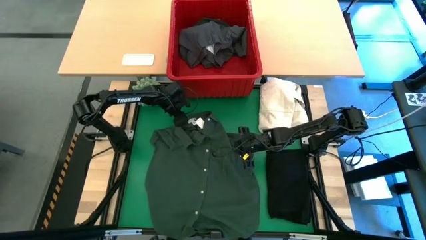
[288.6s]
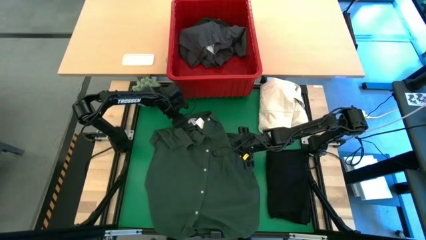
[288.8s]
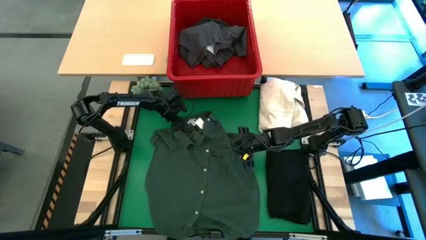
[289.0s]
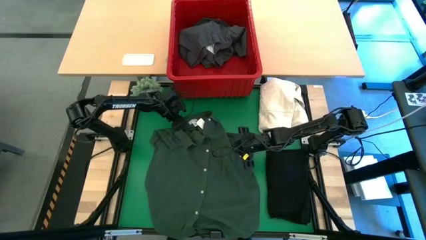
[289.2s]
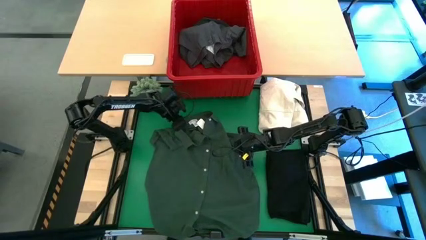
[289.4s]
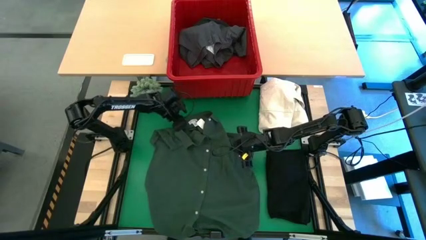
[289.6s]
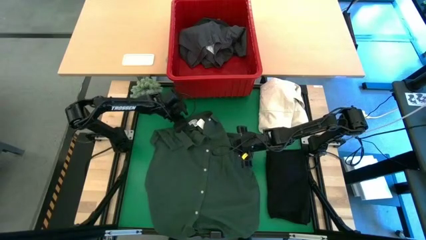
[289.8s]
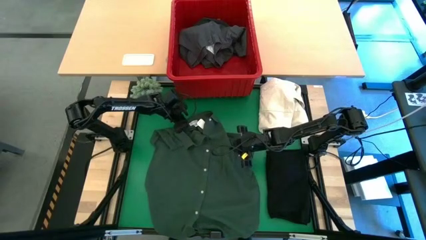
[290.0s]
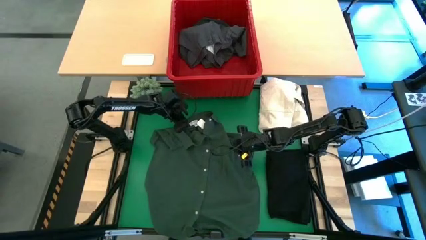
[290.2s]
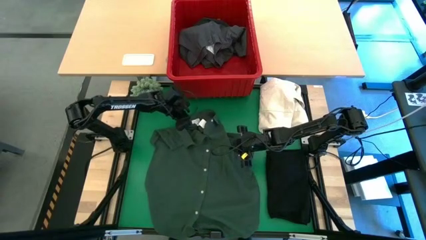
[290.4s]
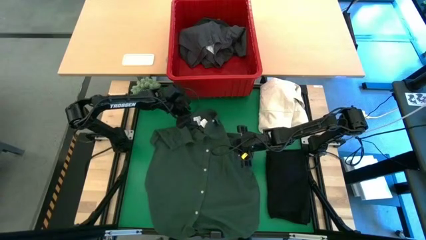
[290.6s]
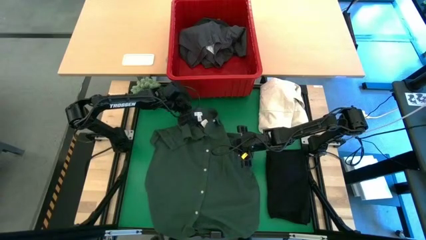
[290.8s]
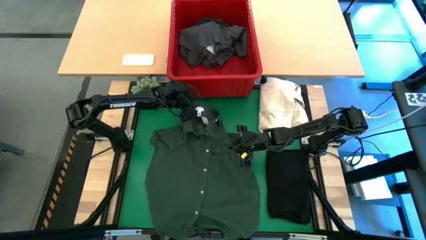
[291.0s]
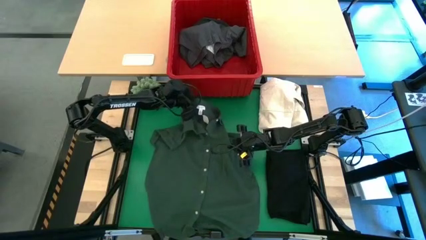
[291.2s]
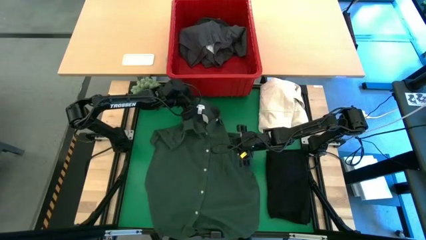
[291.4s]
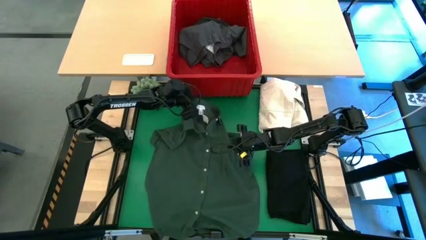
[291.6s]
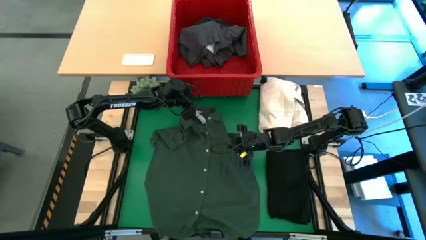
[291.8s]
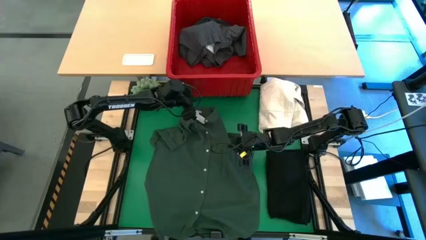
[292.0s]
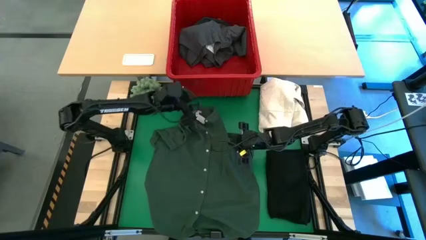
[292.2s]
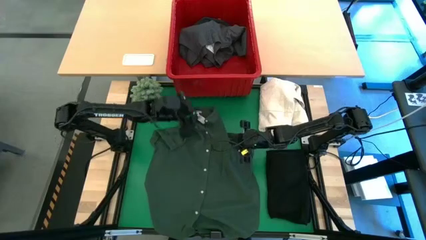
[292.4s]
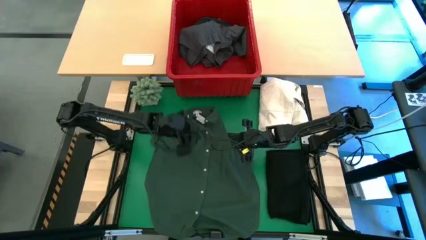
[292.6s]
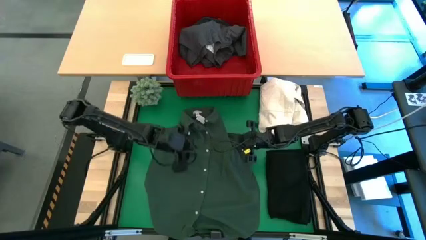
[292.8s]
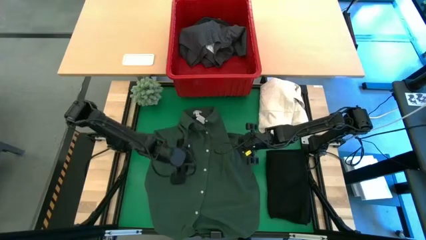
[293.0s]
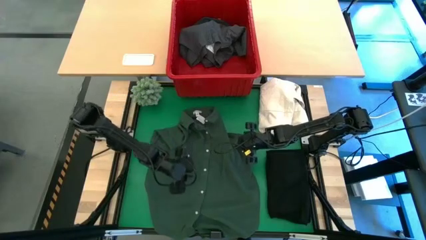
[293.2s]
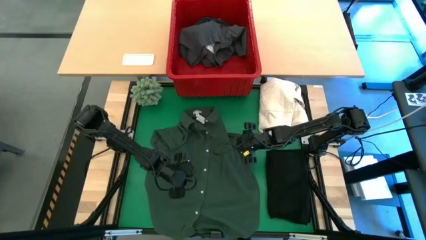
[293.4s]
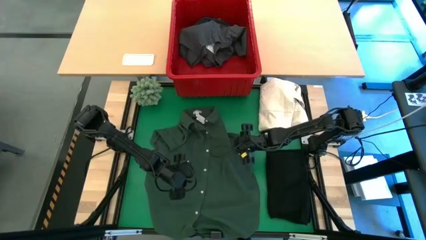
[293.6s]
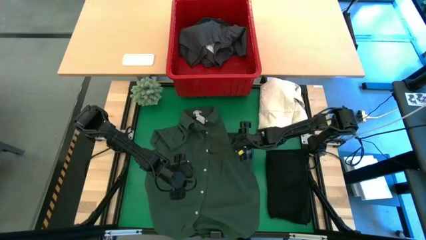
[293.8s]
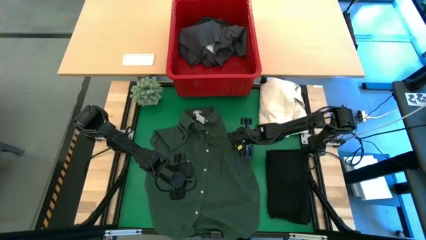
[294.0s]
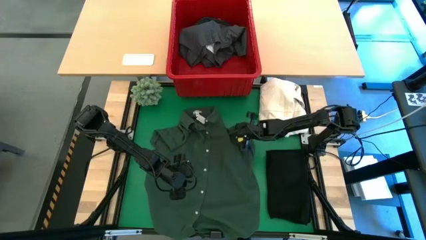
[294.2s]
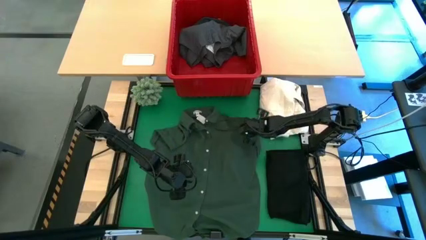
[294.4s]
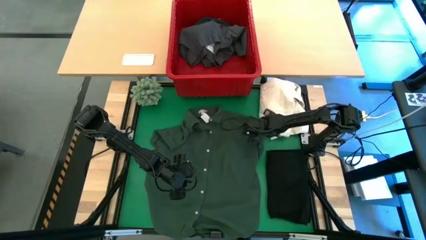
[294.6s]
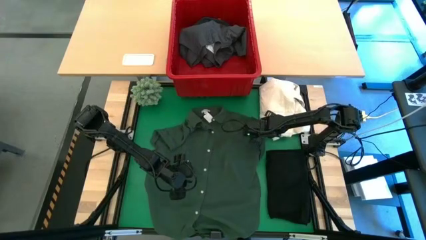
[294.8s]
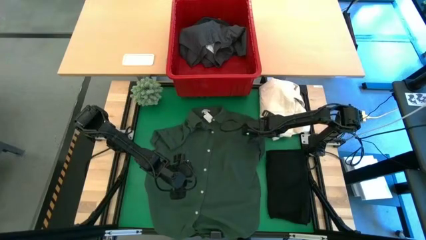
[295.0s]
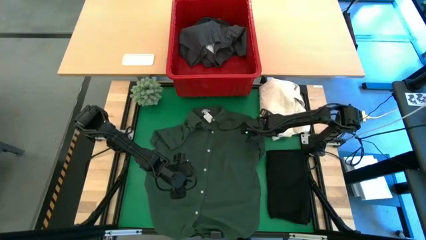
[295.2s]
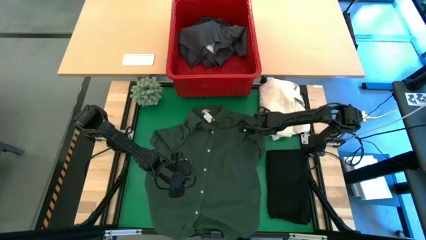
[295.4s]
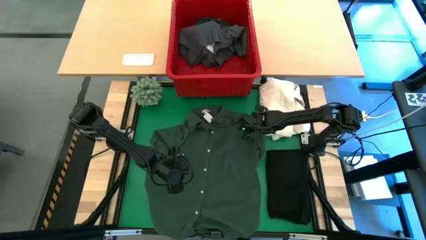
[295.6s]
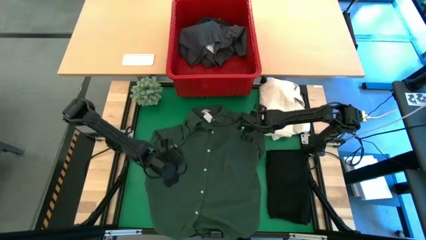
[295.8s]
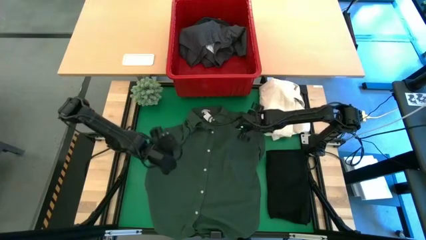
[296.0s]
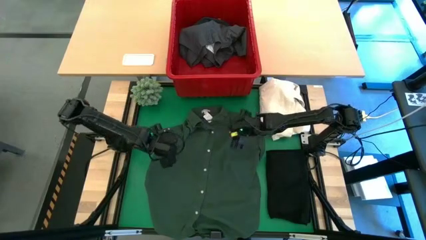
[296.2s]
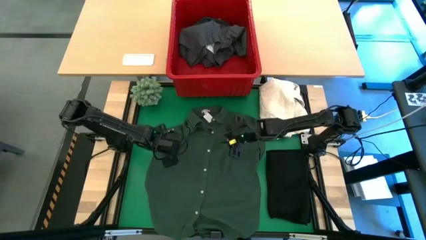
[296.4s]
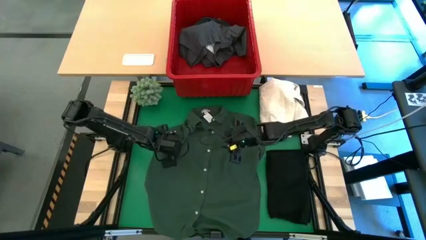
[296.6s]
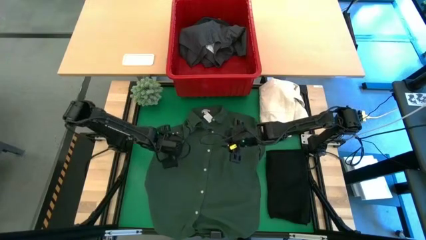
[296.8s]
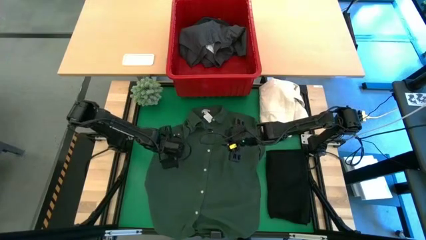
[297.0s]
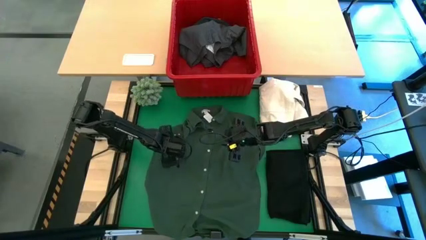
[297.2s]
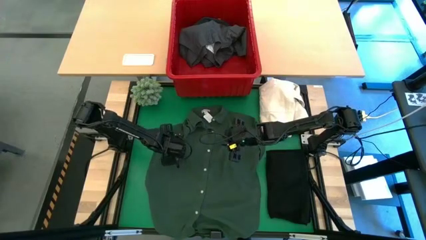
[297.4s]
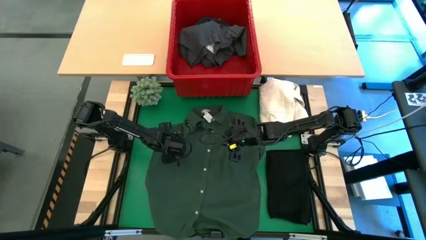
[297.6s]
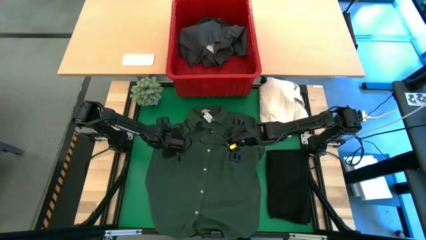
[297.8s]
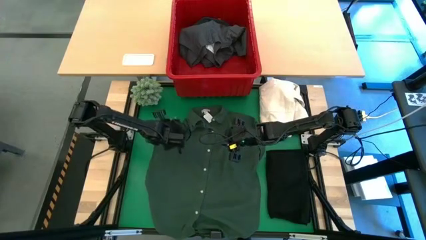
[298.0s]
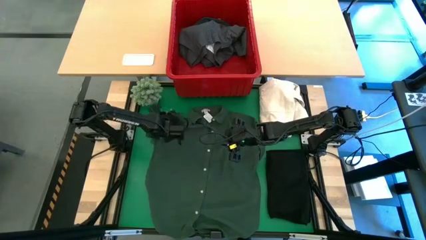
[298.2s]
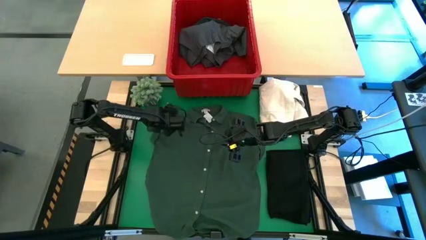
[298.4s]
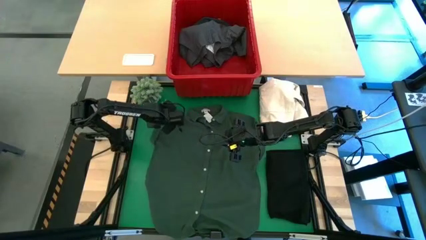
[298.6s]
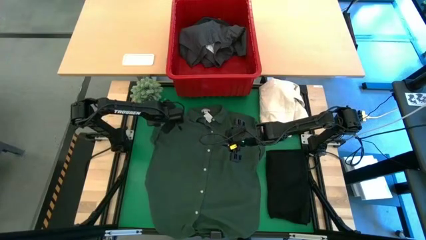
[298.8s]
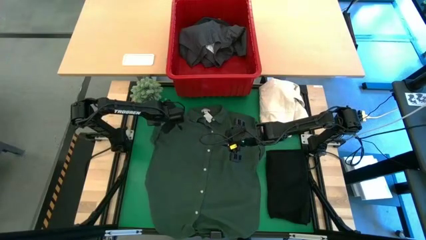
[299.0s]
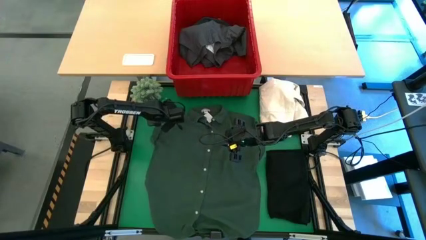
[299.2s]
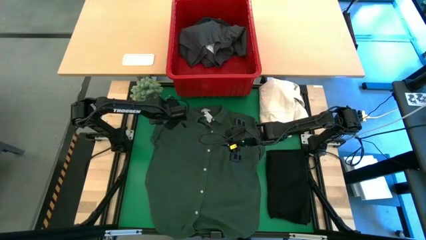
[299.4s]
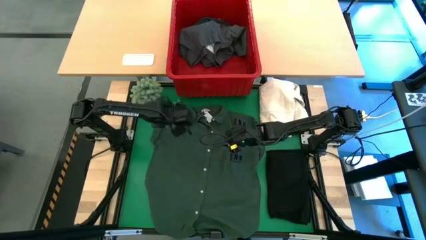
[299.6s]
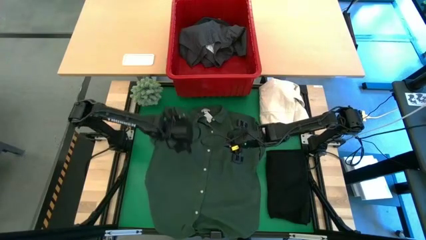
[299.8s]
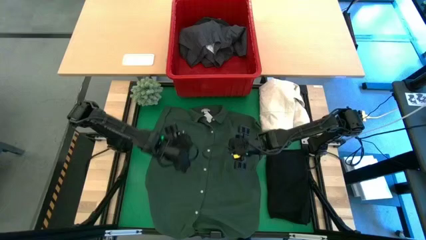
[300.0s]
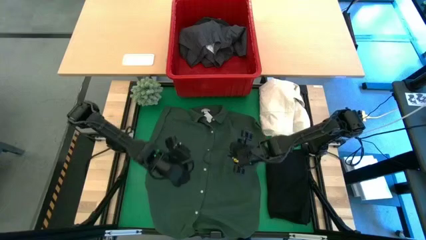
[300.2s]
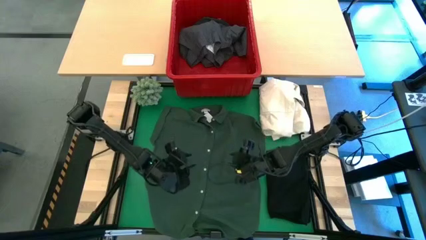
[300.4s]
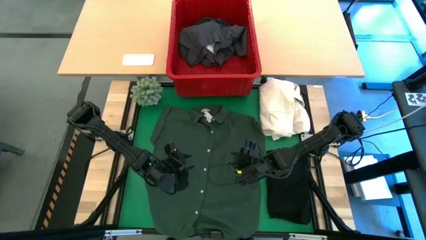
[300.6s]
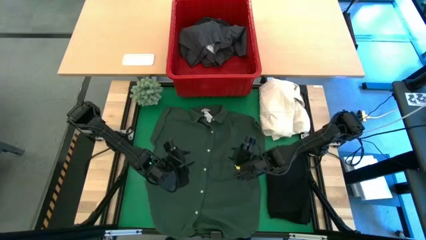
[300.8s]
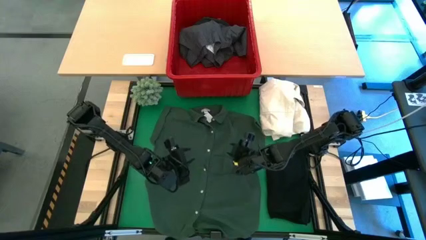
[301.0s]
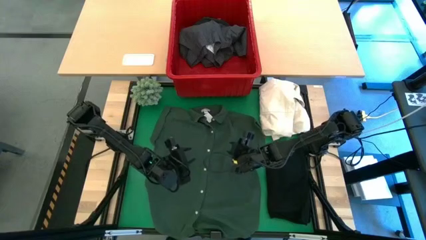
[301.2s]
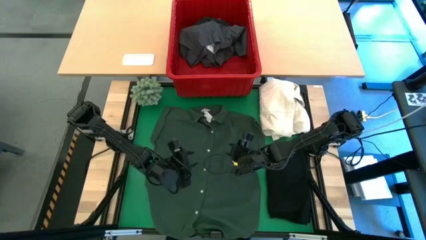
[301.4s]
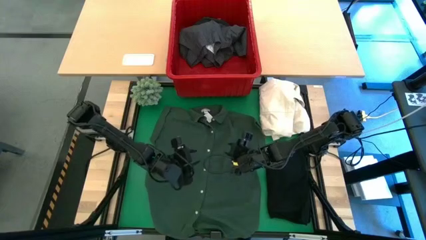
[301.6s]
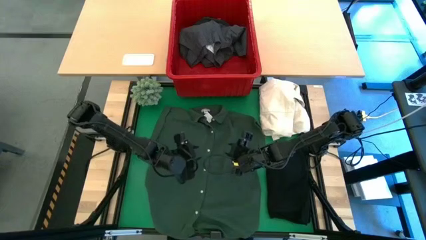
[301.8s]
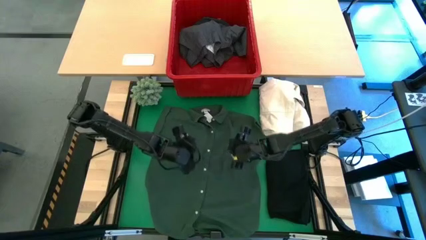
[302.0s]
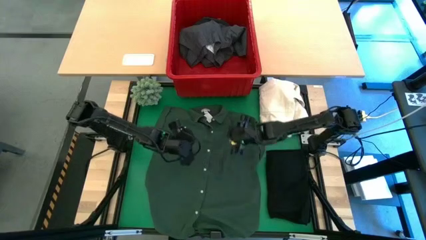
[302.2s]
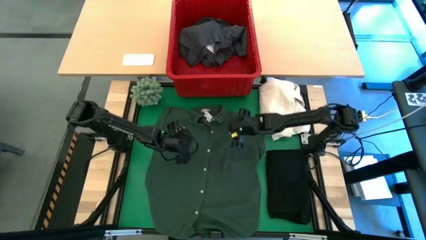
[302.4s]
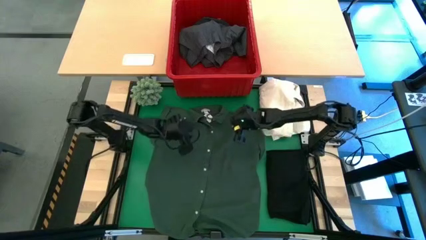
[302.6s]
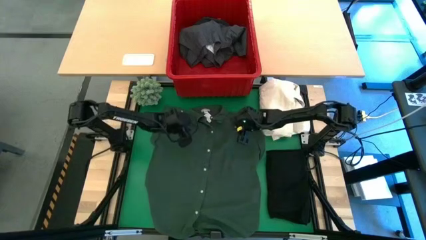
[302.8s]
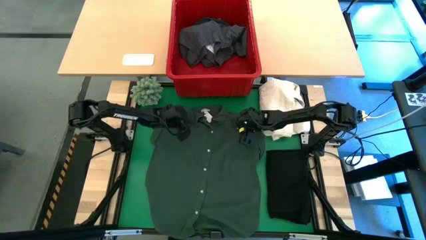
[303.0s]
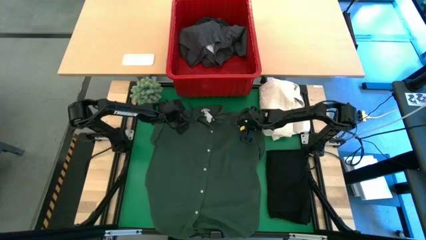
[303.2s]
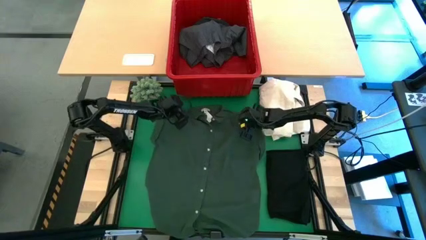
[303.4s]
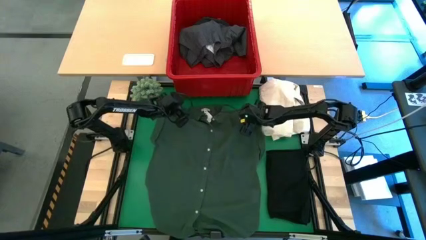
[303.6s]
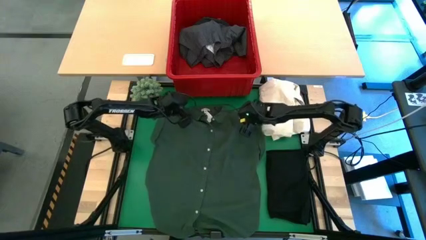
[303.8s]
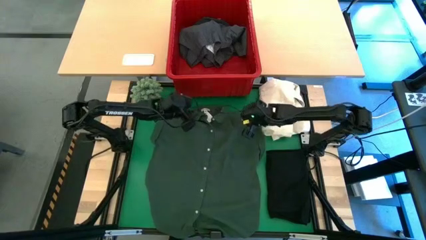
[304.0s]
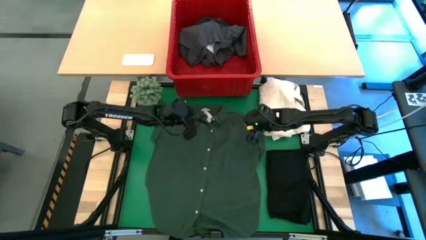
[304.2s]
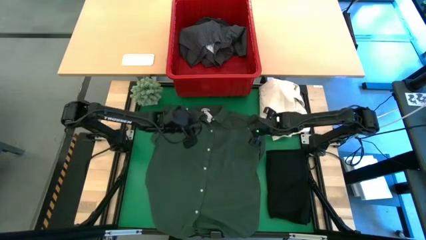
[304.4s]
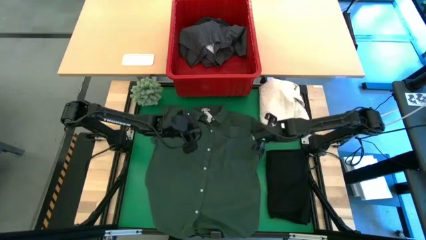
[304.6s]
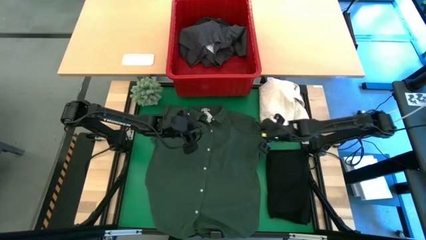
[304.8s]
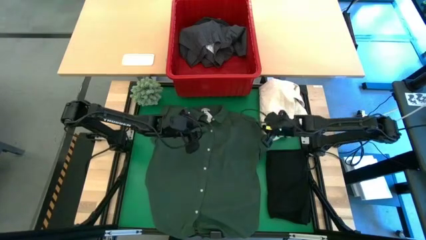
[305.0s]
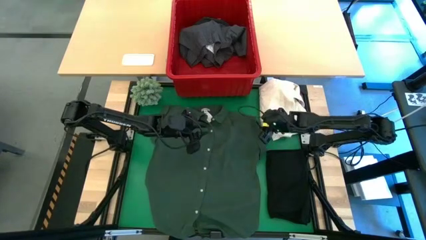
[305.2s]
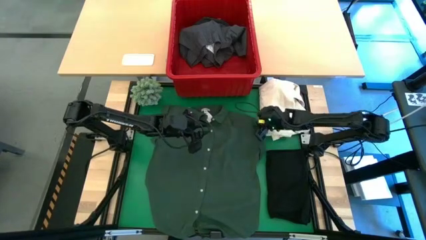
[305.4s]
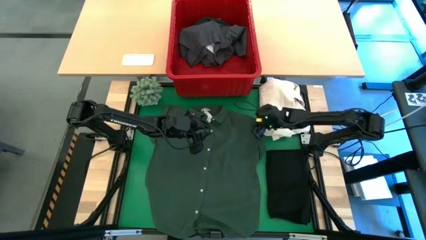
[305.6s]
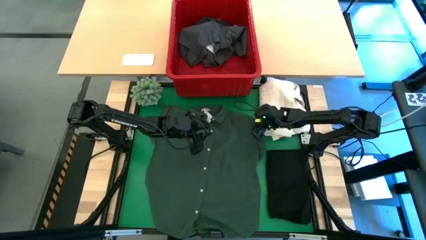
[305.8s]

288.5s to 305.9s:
Task: Fold laundry
Fold the green polo shirt
